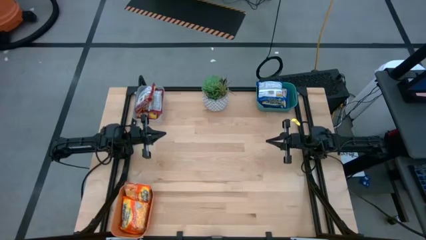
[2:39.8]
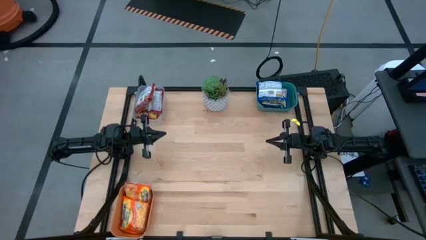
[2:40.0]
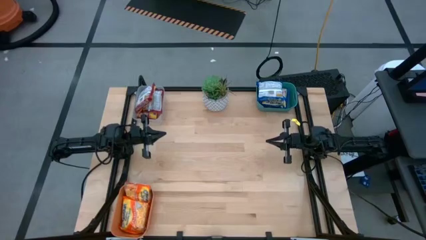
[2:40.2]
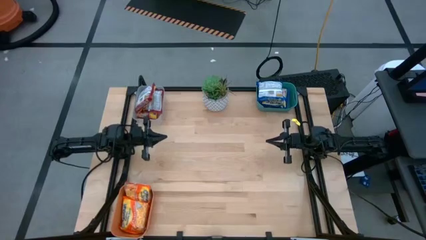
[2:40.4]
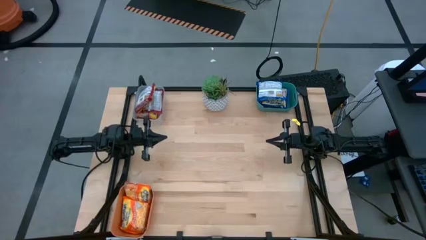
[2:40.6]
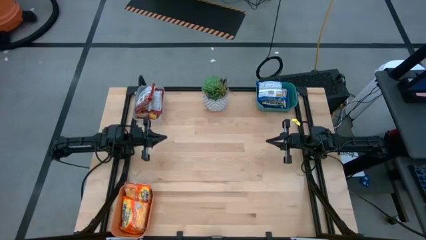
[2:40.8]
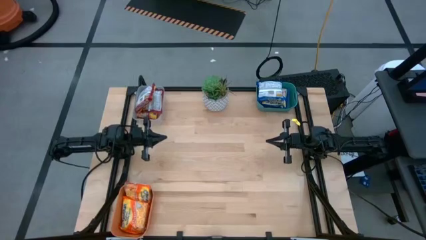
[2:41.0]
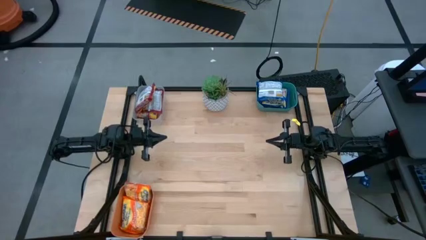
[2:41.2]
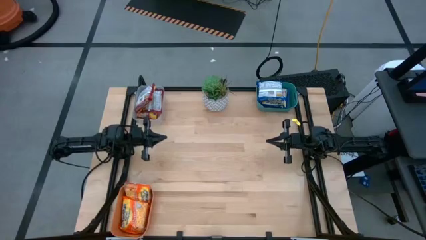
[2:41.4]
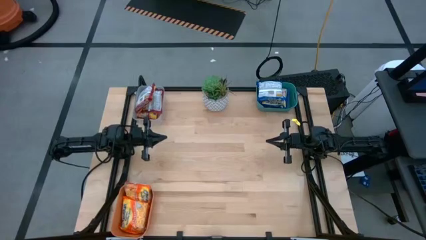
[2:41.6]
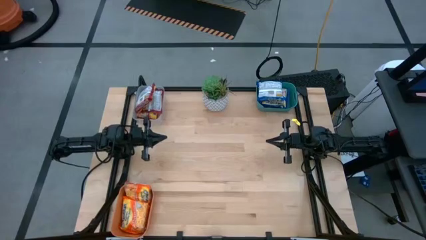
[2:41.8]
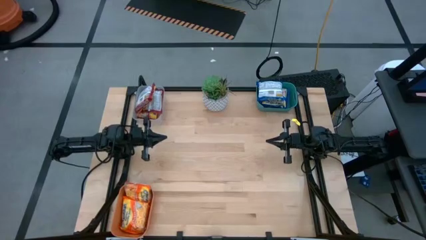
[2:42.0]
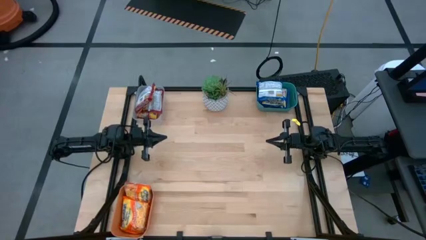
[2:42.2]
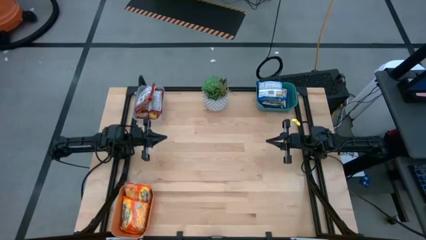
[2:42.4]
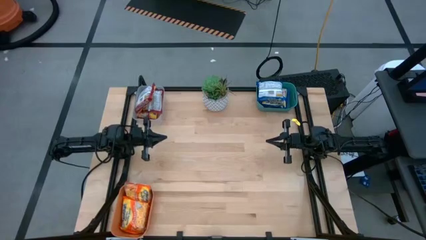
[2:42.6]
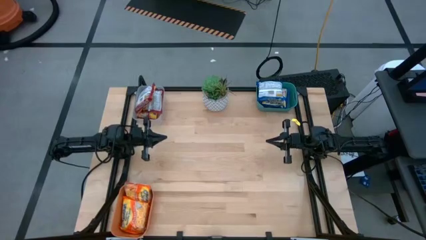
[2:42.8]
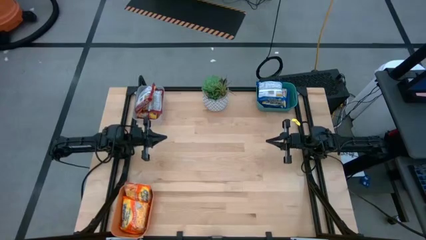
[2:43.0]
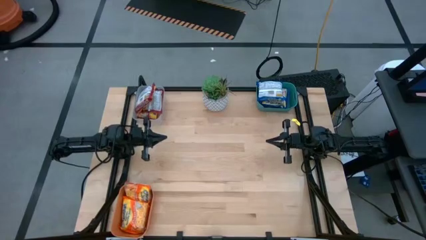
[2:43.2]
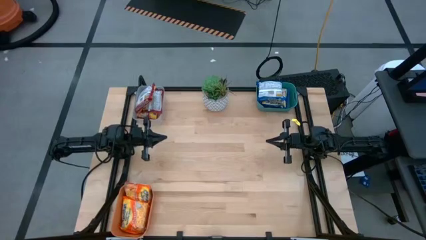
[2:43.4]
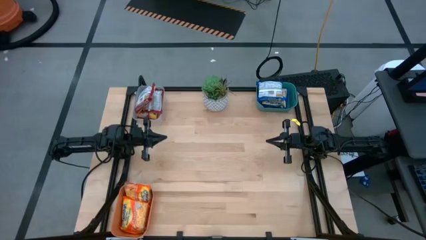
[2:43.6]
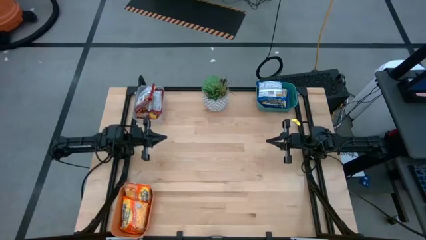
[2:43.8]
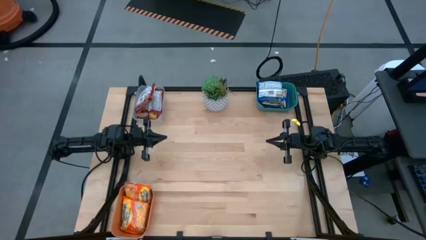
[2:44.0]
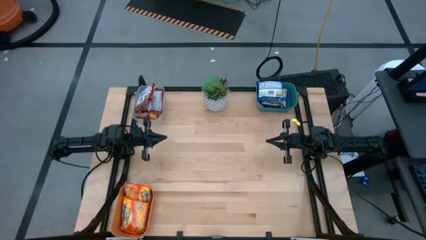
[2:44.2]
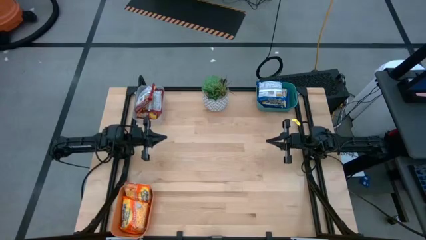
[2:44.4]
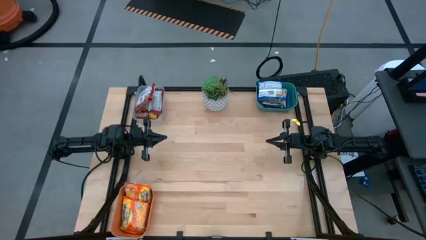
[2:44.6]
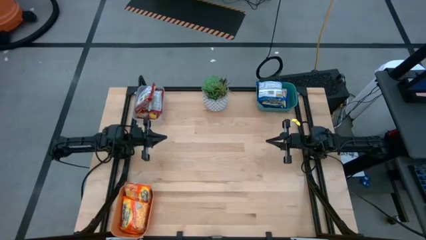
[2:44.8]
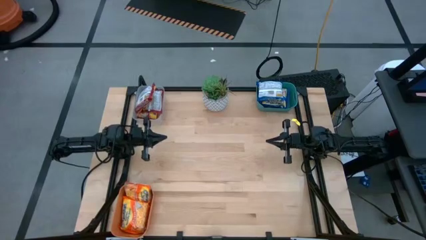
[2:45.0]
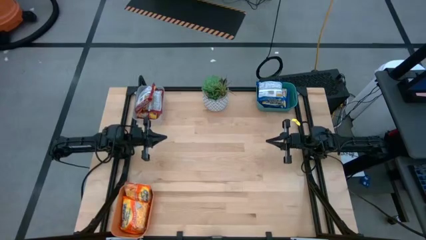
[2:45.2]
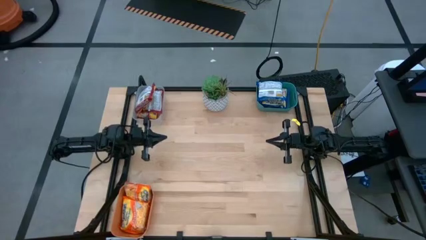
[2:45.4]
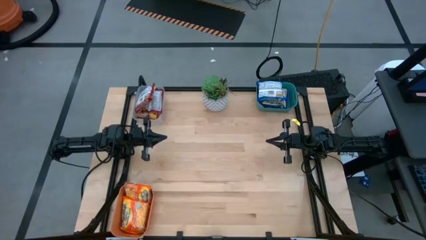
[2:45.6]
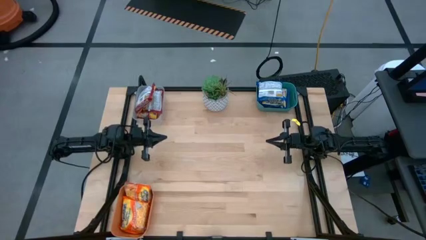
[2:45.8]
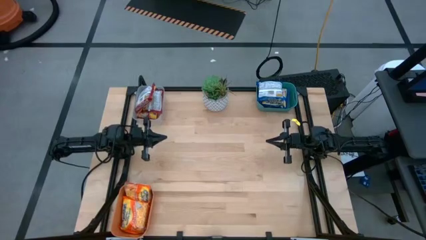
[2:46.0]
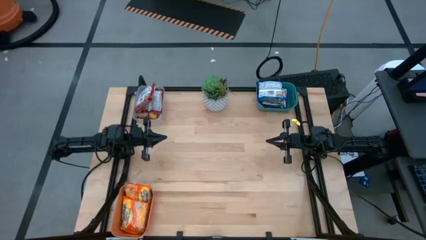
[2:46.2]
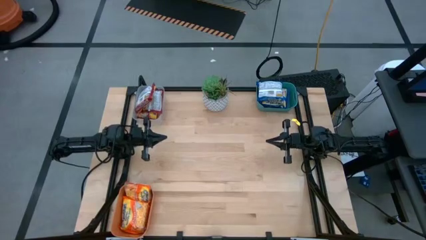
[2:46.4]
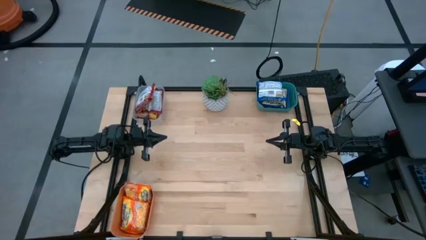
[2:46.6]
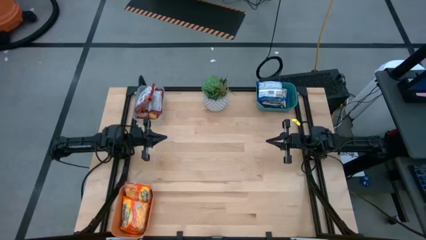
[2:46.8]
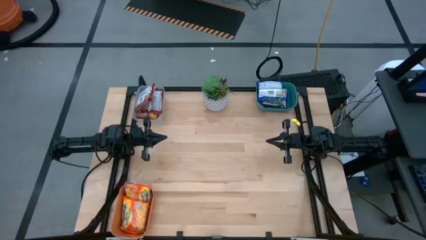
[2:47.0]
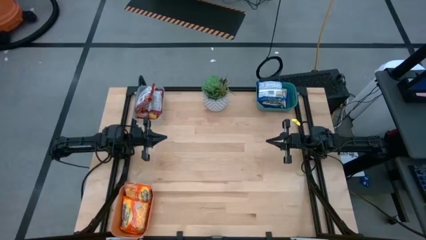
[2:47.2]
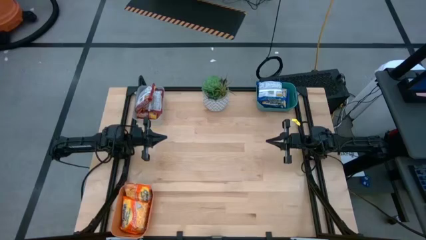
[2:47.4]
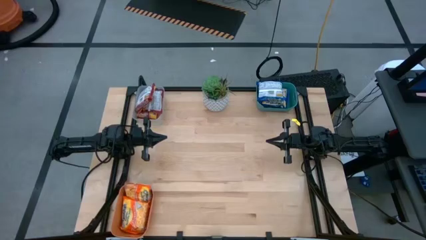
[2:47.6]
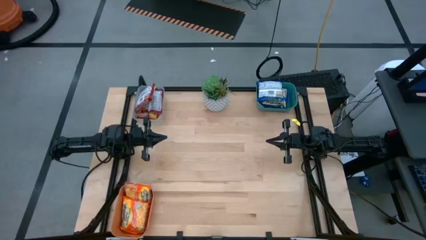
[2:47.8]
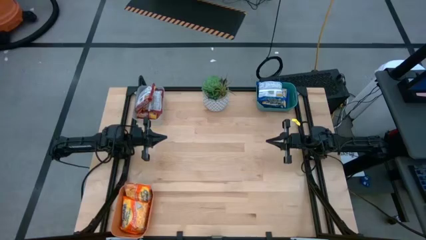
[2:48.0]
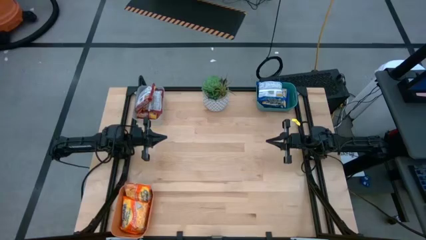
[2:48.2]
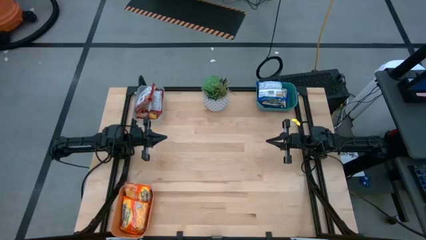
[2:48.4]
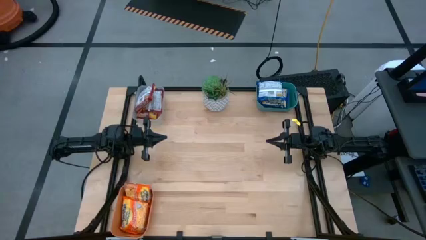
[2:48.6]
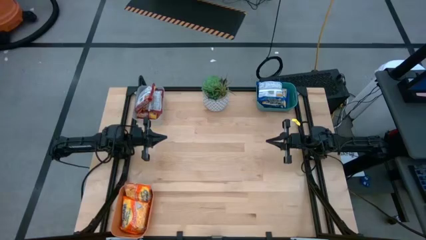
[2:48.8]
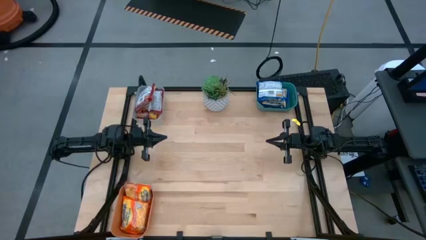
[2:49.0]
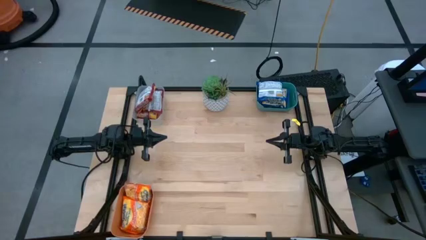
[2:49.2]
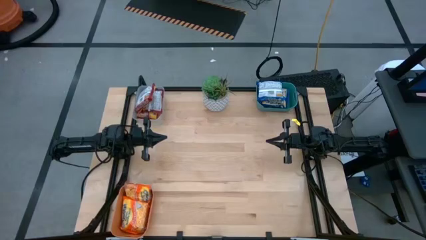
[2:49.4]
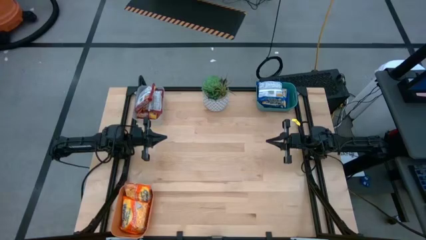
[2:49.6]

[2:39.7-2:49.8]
Task: Sort Maruchan noodles
Return to Home Position

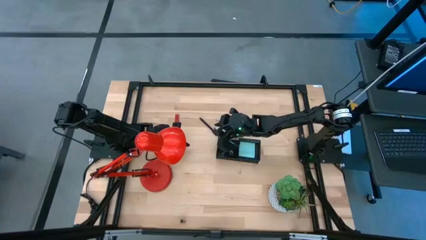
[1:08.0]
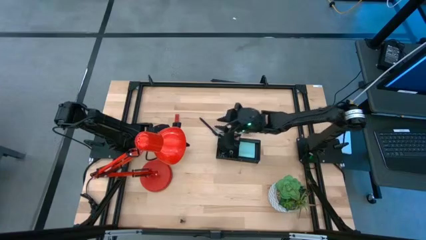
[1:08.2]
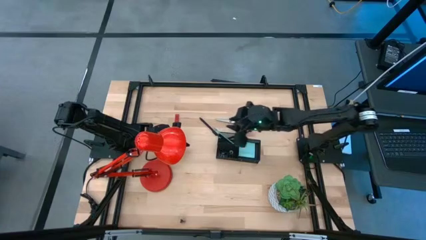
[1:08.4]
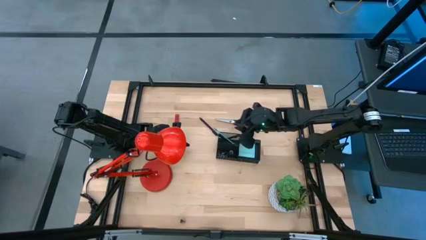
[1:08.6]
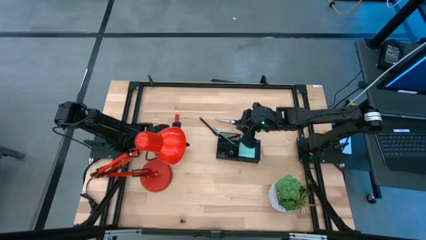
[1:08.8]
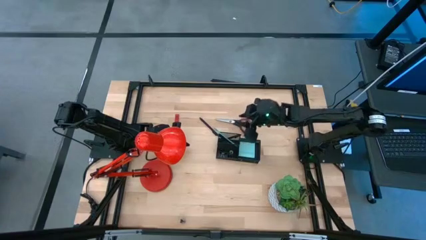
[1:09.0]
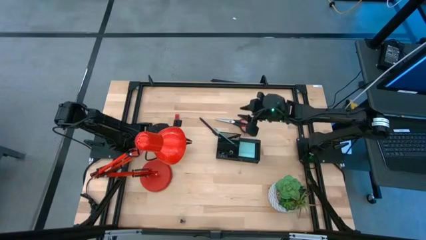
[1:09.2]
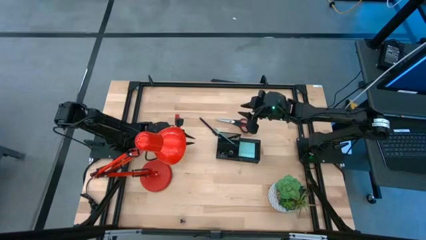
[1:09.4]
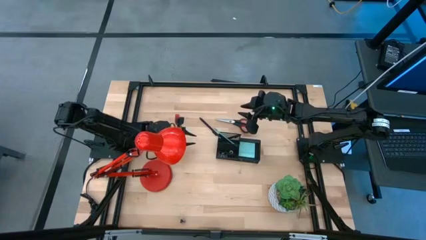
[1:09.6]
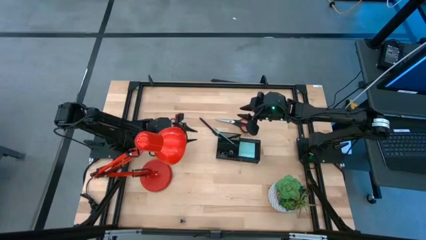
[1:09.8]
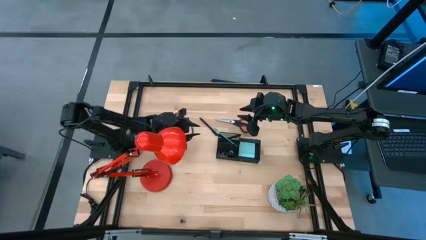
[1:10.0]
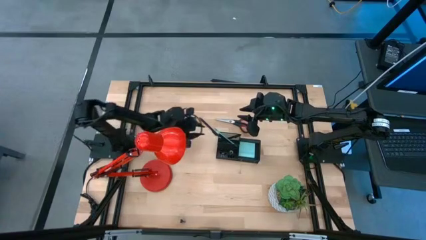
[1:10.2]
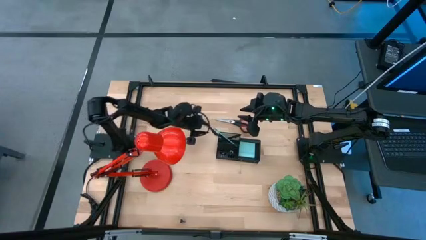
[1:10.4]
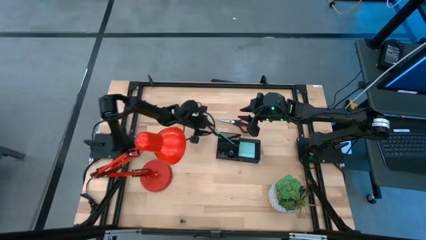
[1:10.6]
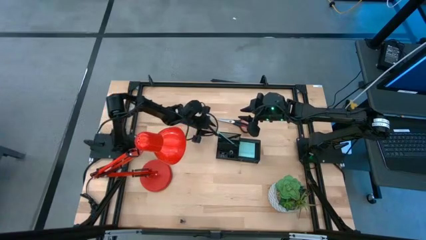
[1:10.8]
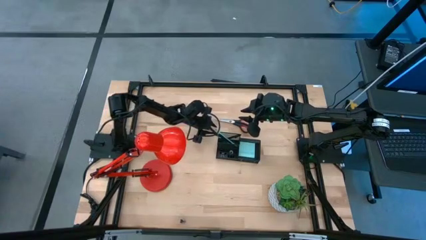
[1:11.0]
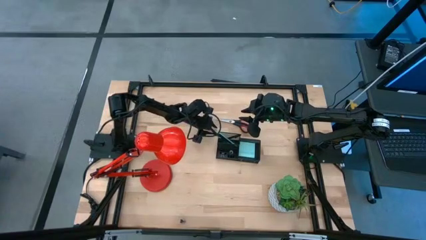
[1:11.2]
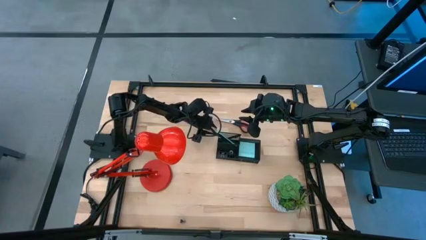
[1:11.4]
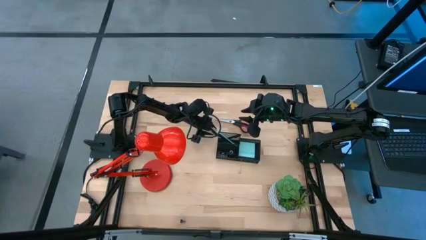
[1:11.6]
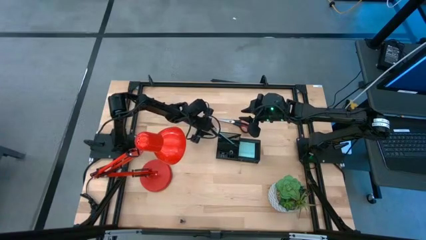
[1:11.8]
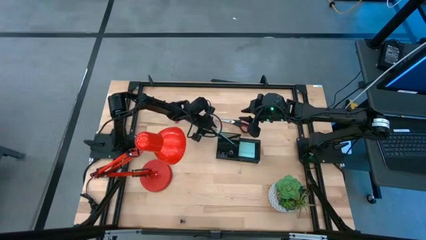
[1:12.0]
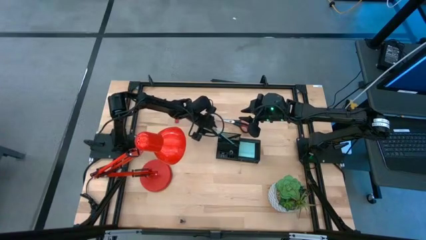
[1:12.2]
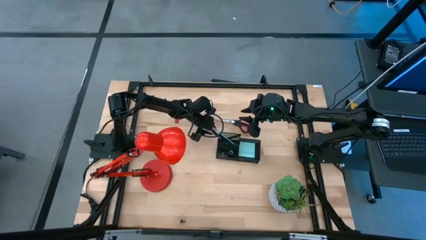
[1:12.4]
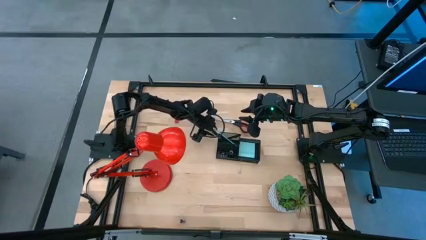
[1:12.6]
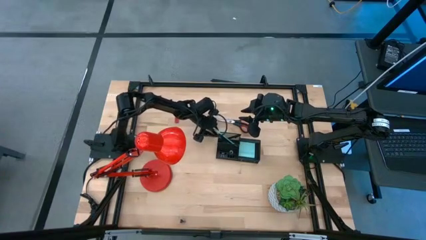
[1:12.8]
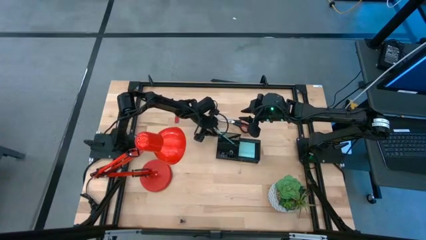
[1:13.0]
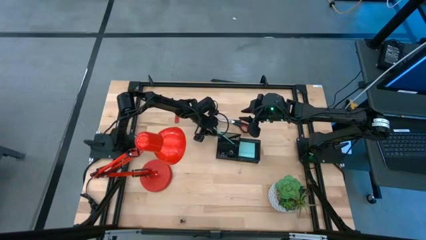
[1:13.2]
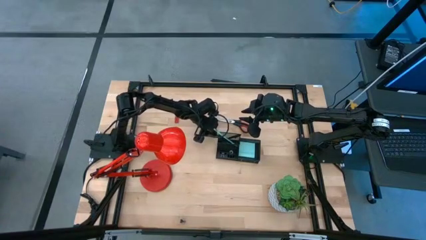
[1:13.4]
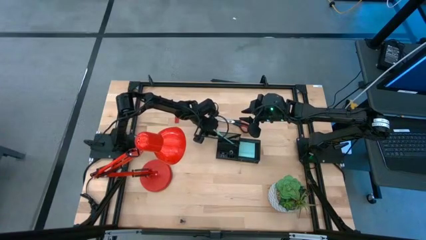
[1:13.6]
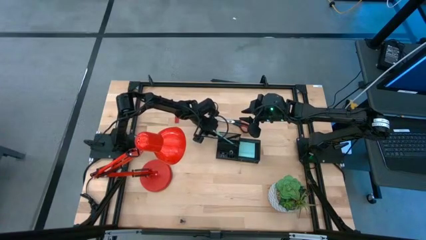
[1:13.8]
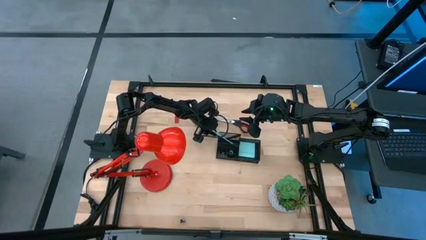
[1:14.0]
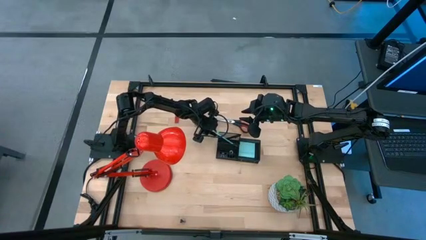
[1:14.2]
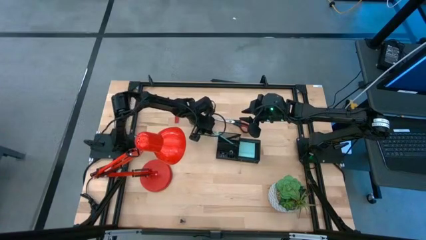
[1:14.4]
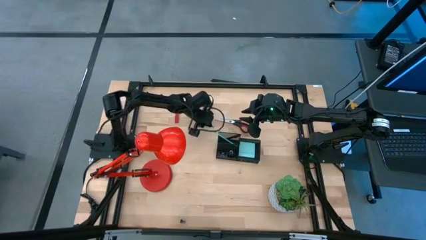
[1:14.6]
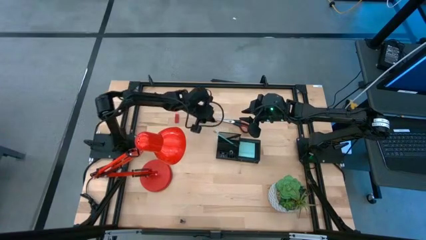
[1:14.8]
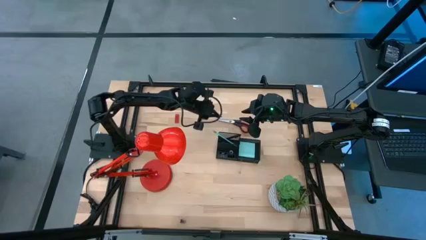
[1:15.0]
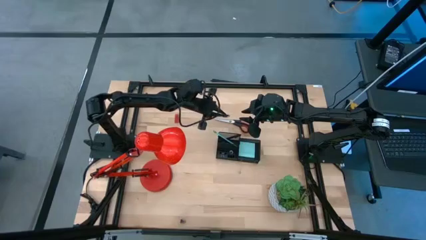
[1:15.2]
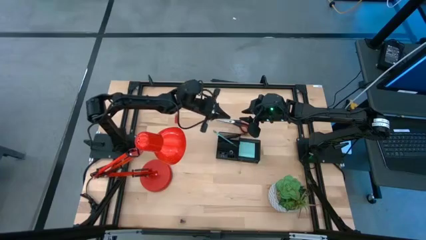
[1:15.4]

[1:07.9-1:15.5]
Task: Pick and place office supplies into organizer
Put the black pen into the black desk organizer
